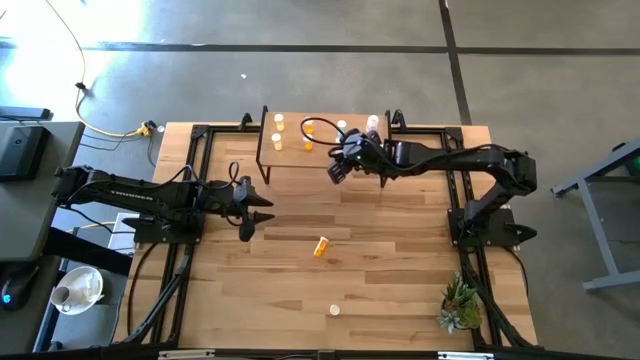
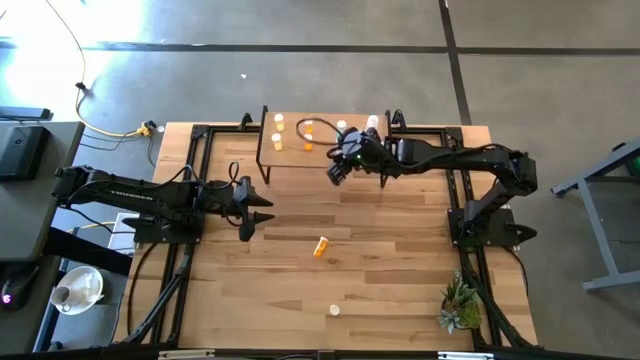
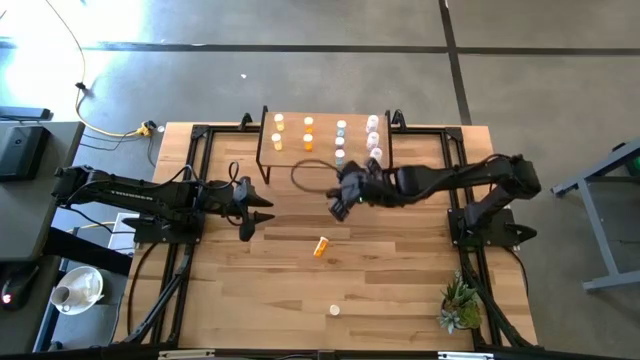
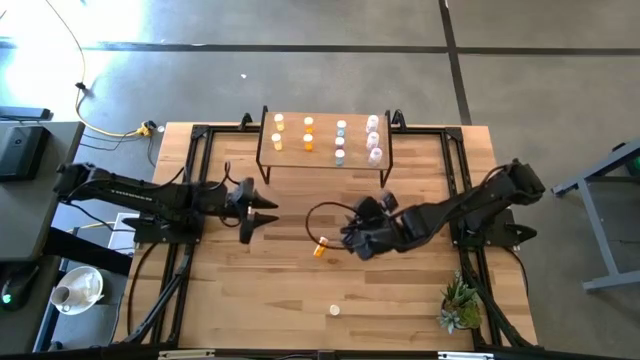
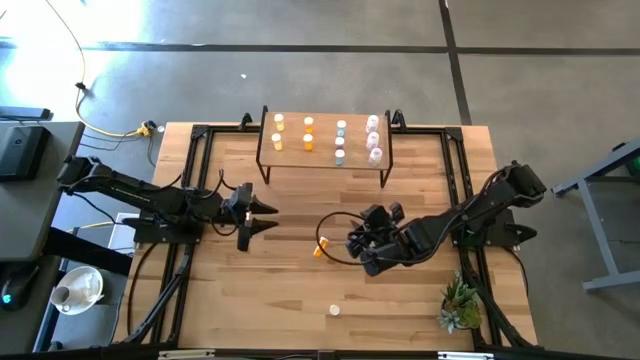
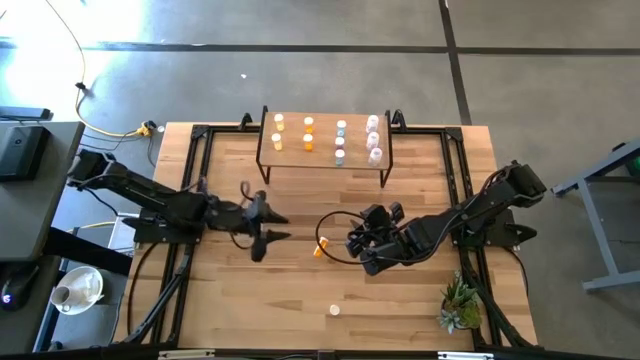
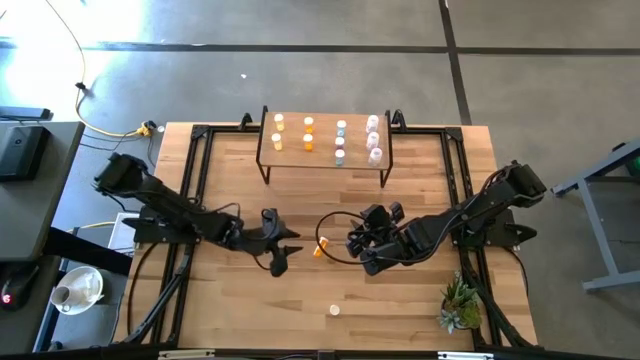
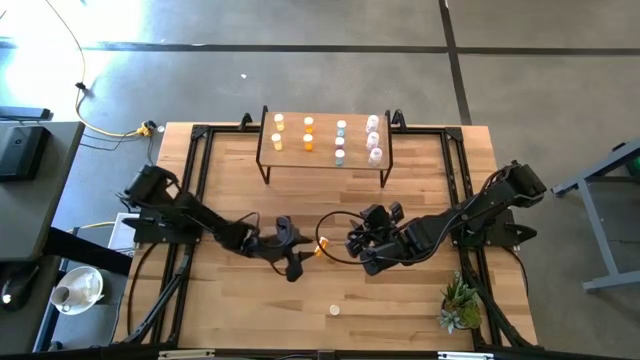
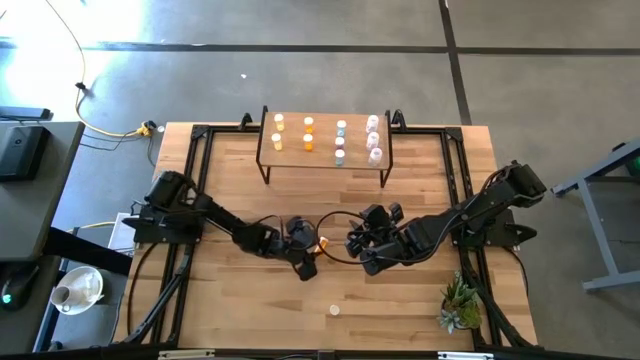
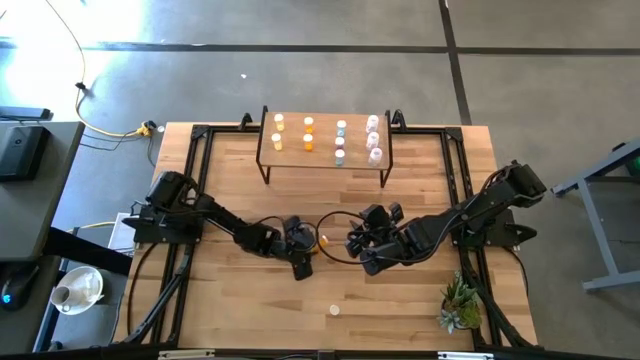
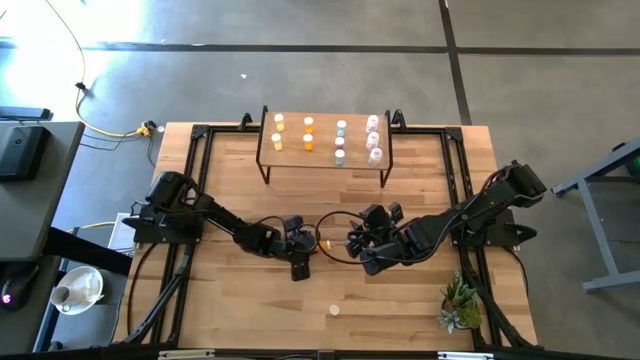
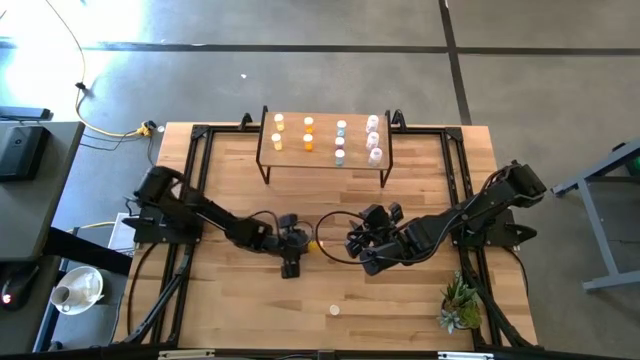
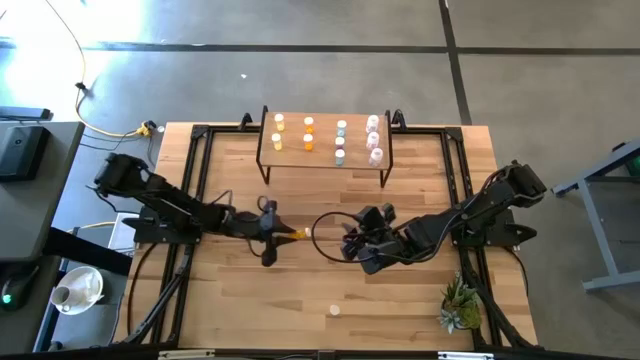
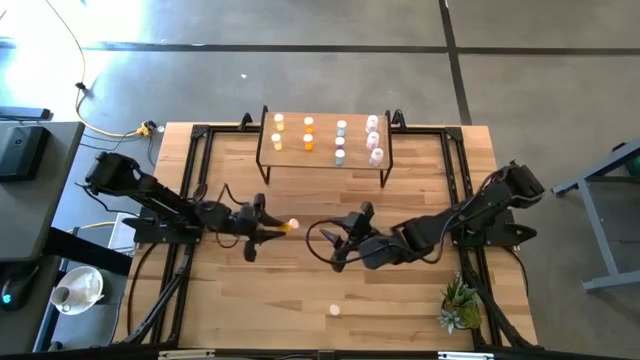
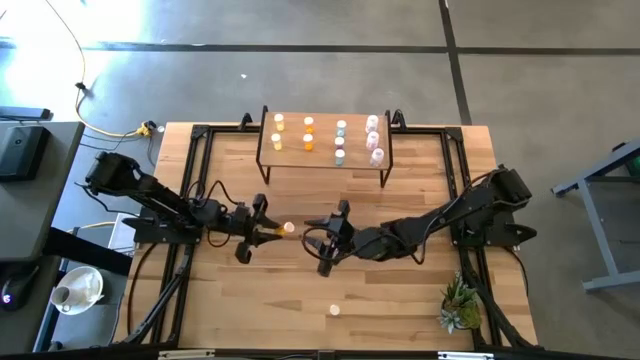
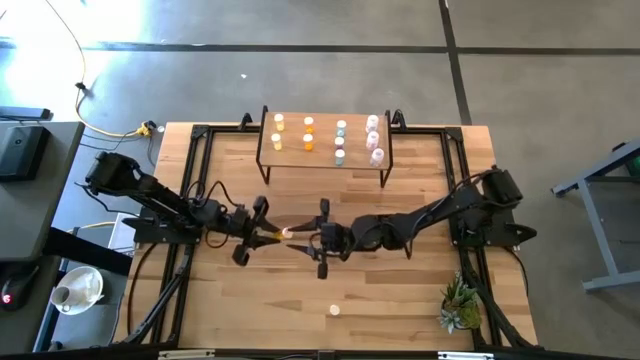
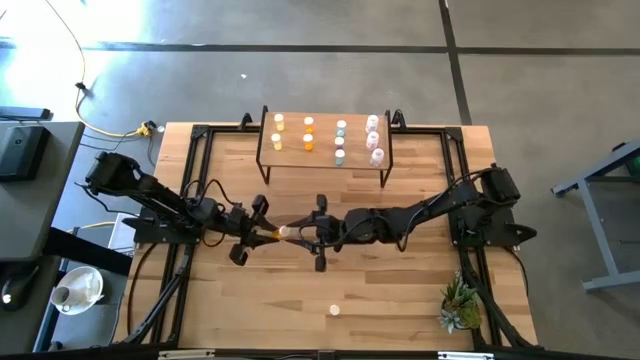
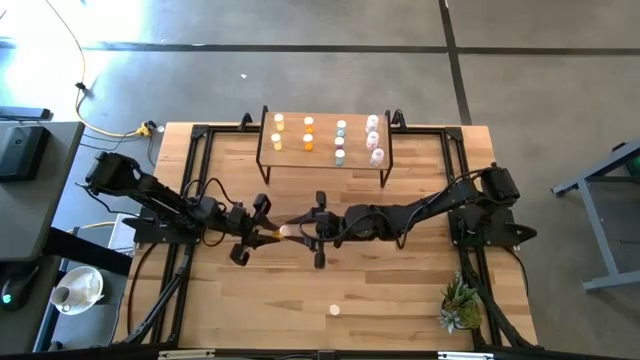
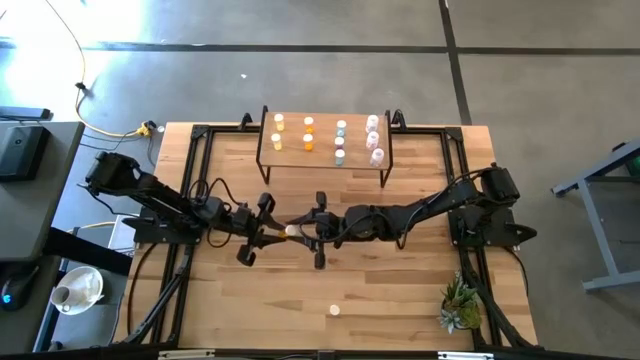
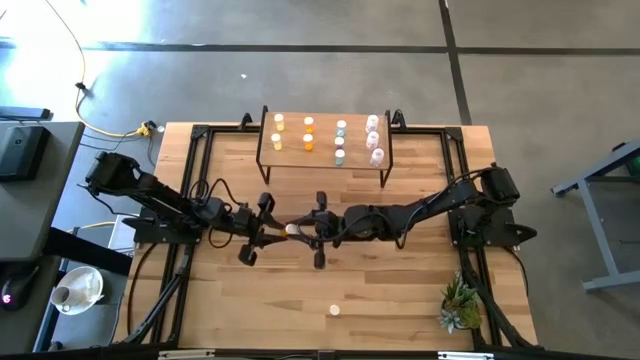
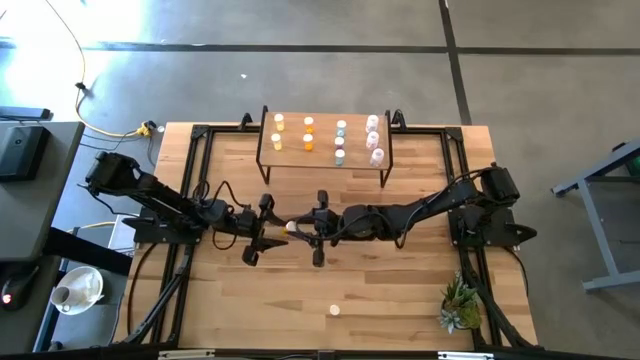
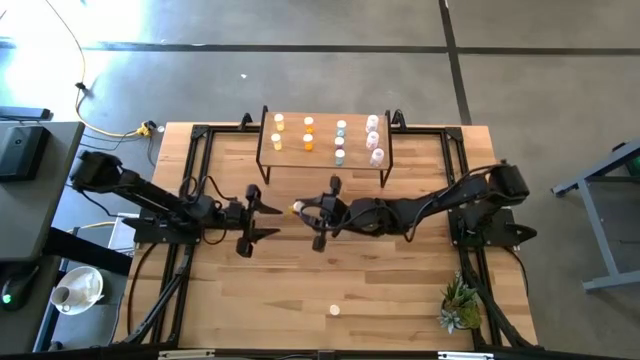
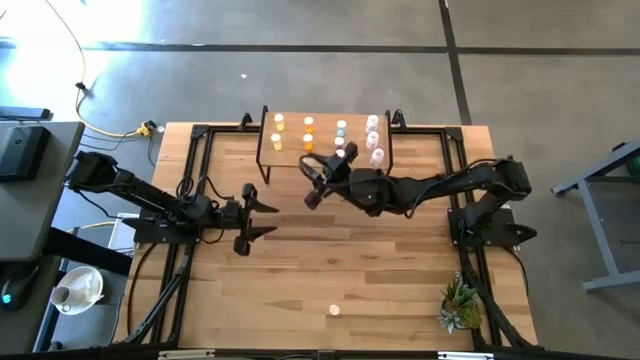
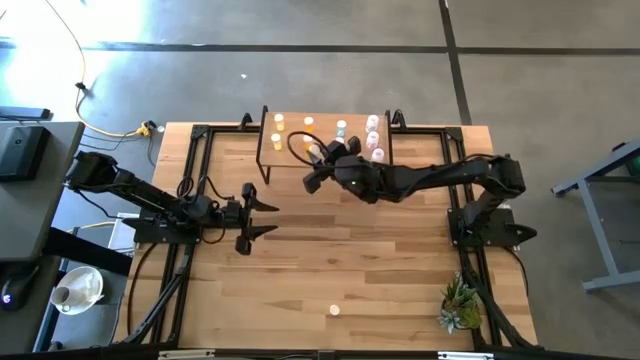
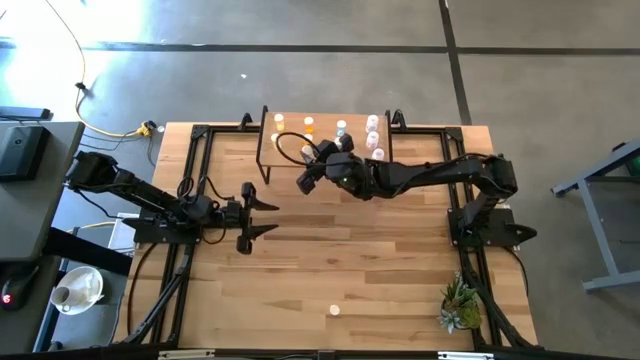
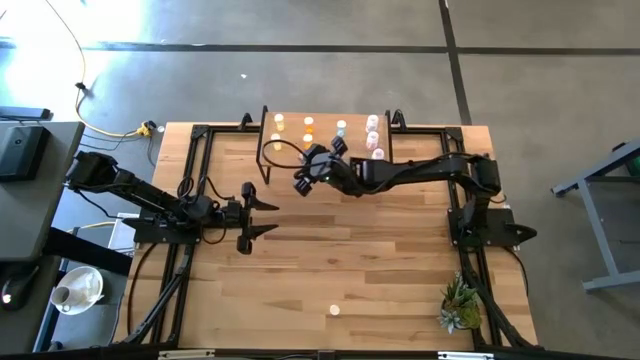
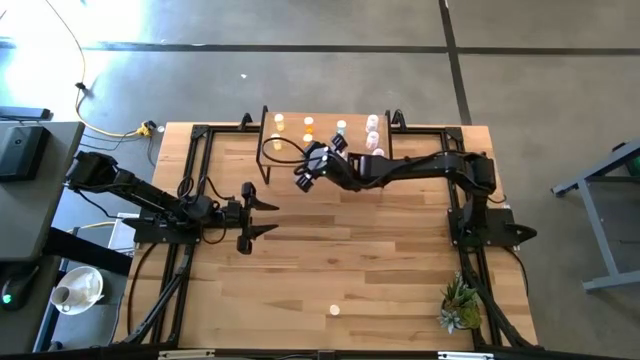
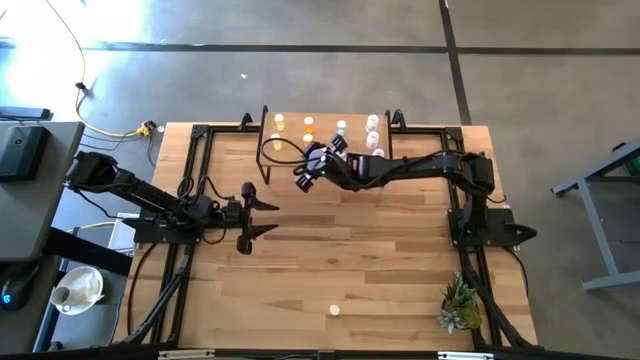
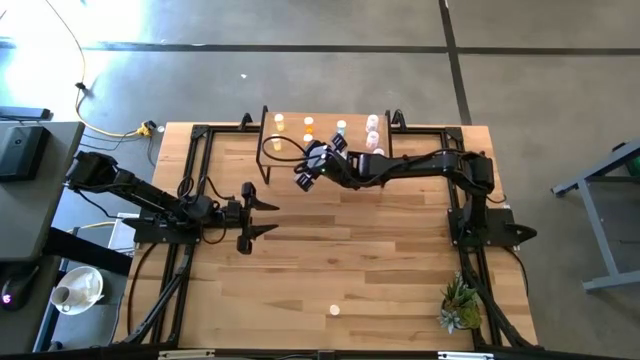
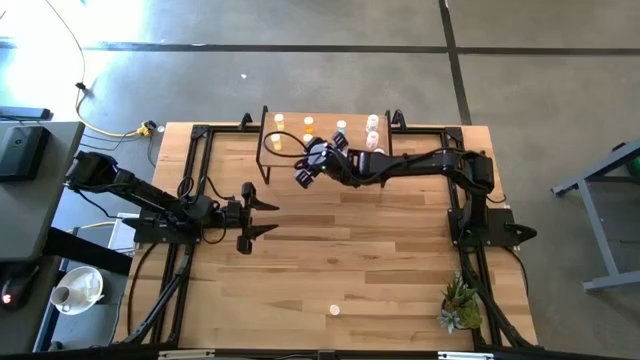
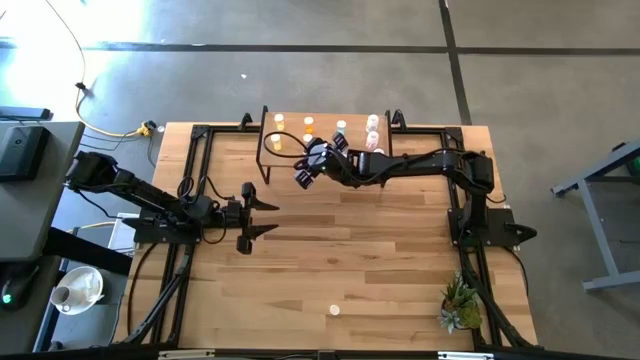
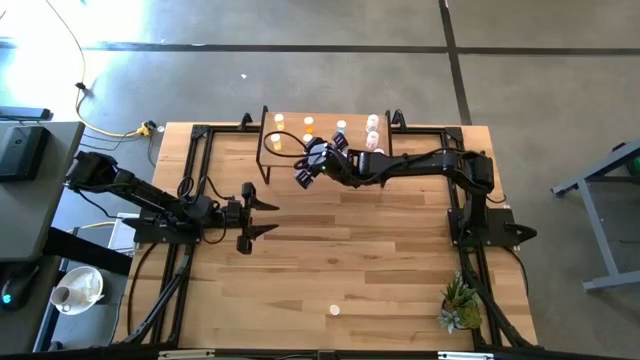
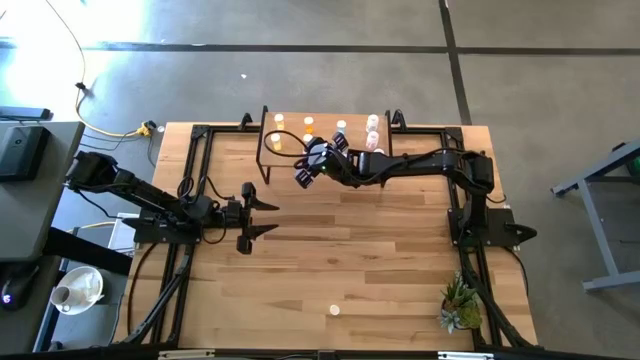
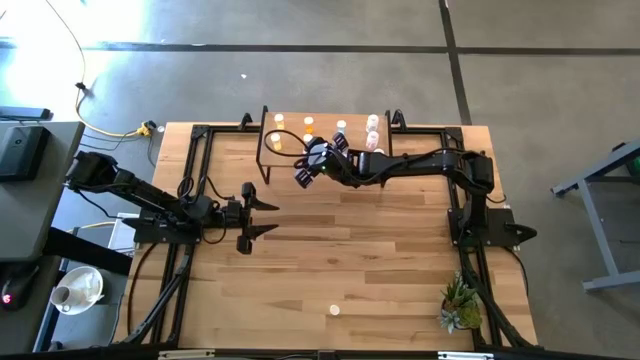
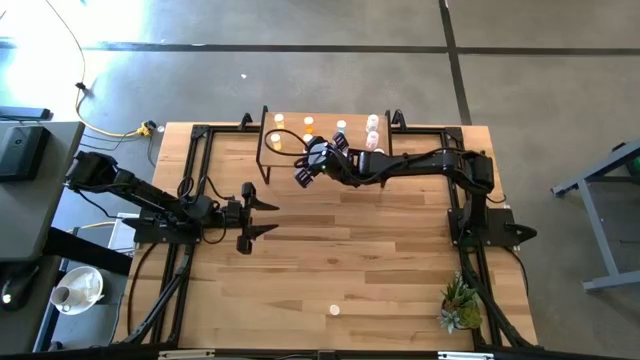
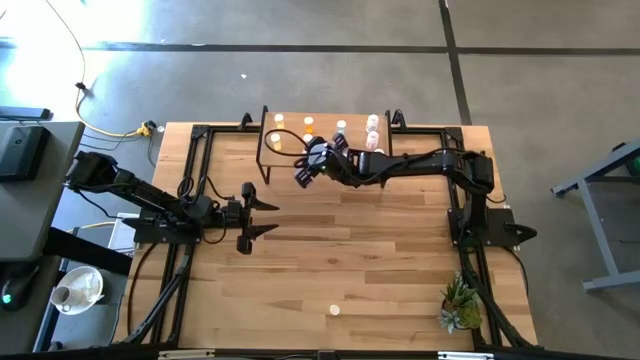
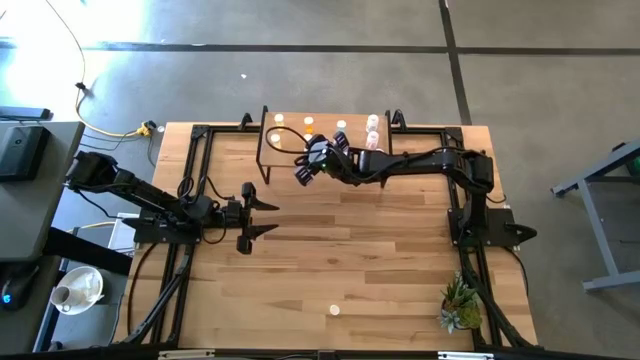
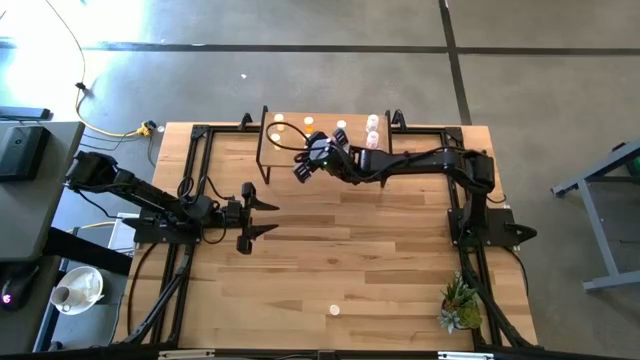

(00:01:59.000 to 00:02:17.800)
Task: Pick and place medicine bottles onto shelf by color
Put the orange pill bottle on the shelf aligned with the orange pill bottles

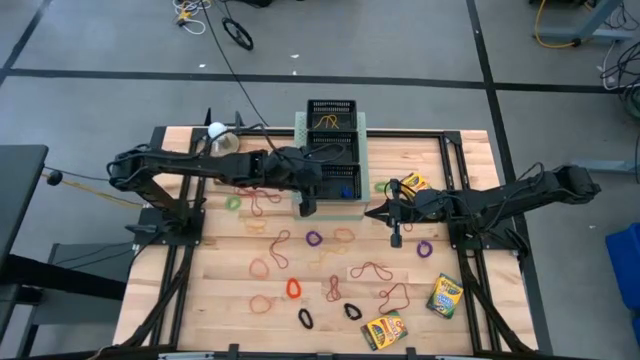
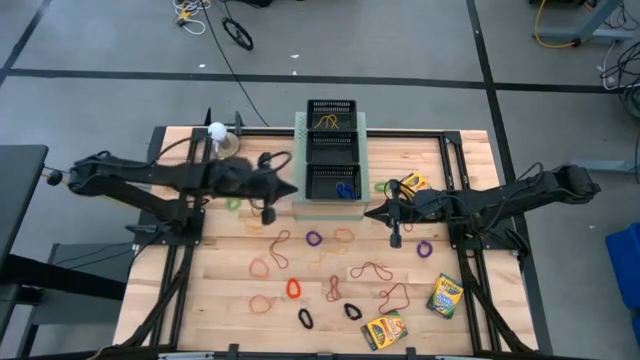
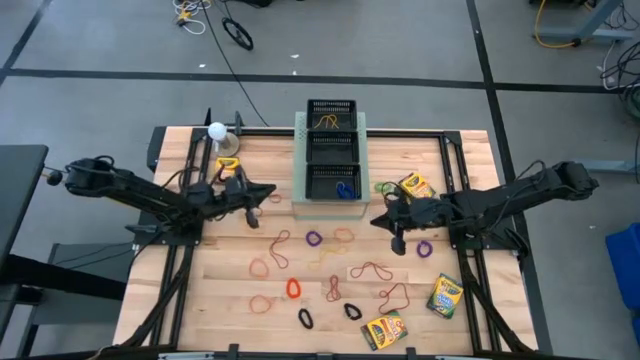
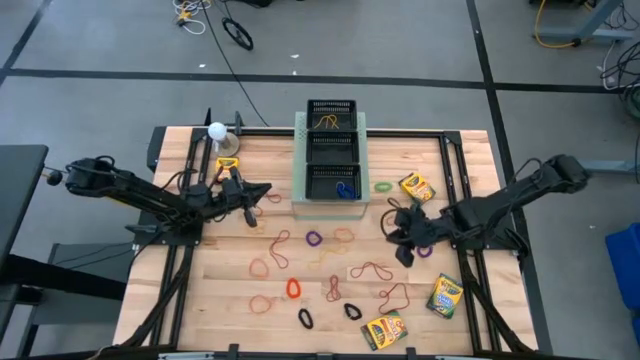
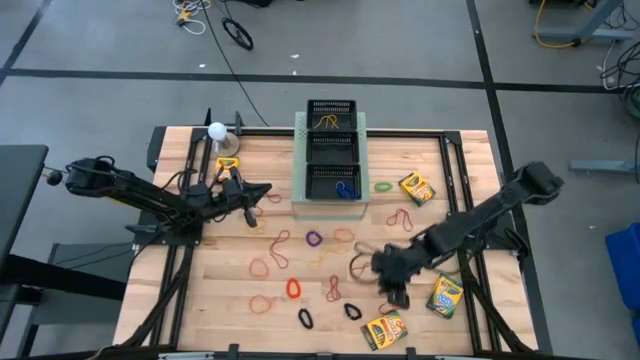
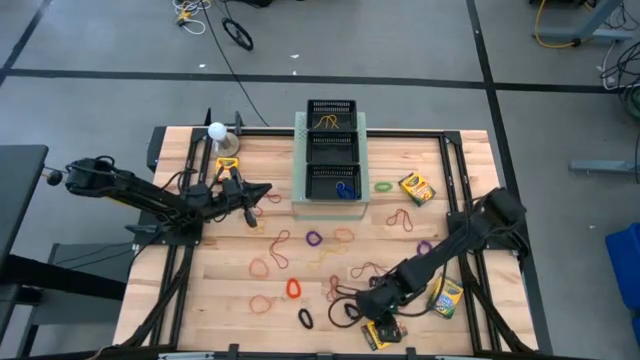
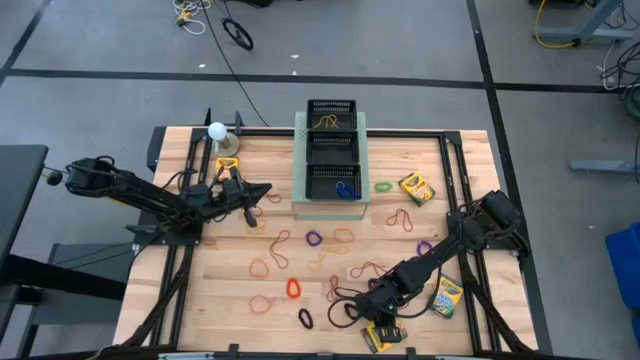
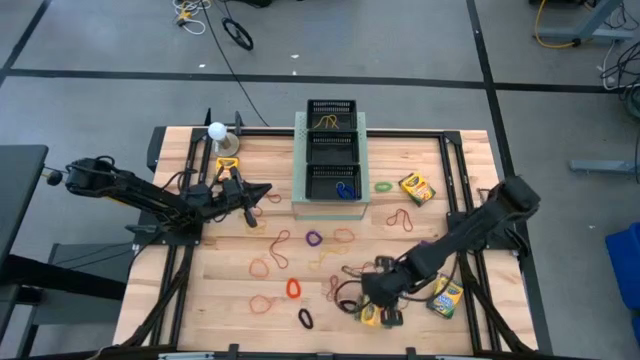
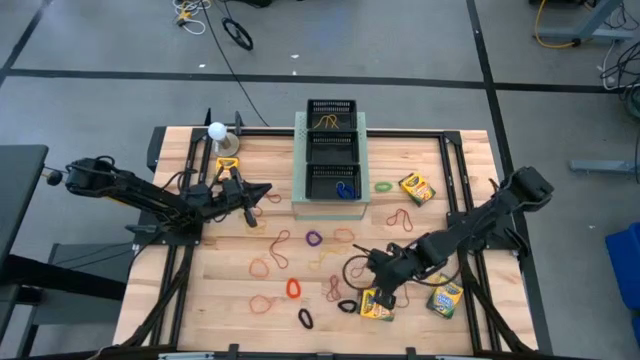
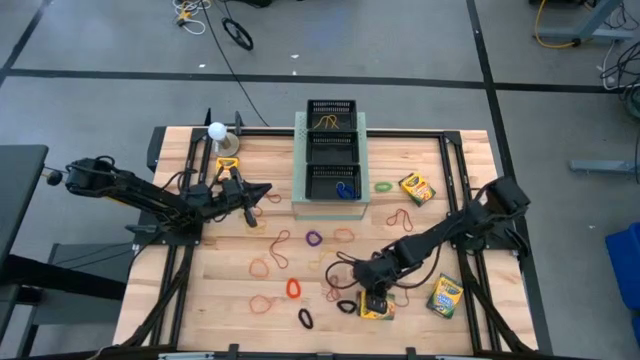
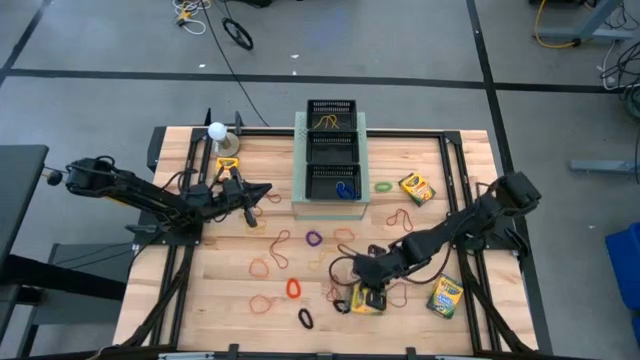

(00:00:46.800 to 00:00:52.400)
Task: Pick & Place Office Desk Supplies
Put the yellow crayon box into the middle black bin on the shelf
